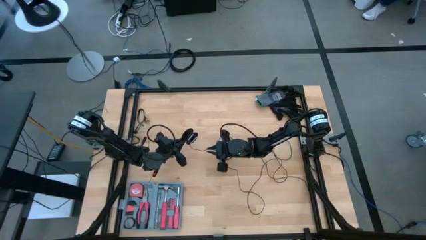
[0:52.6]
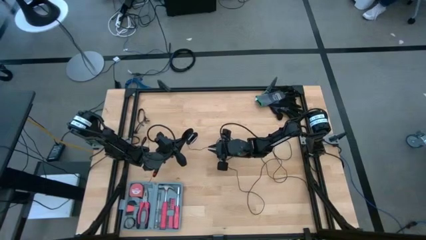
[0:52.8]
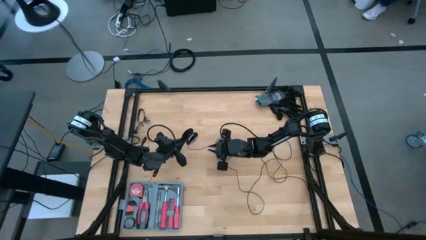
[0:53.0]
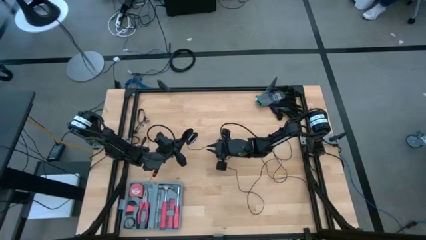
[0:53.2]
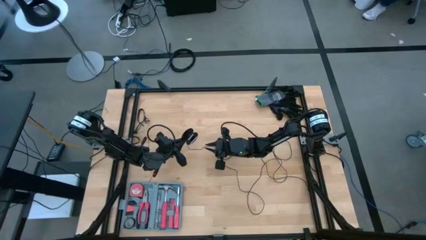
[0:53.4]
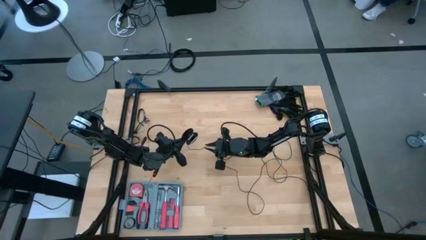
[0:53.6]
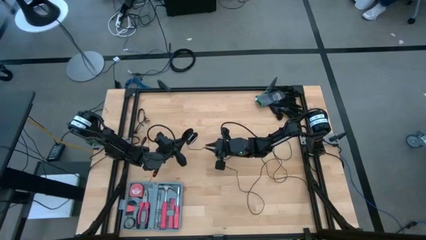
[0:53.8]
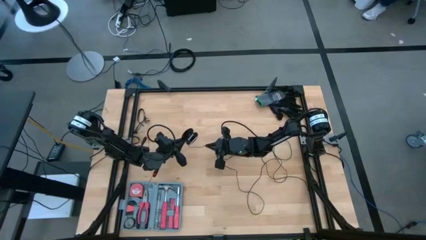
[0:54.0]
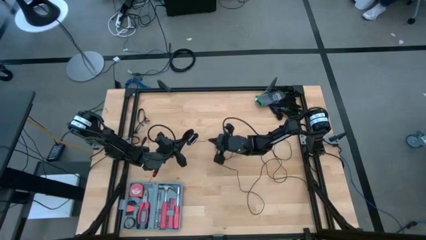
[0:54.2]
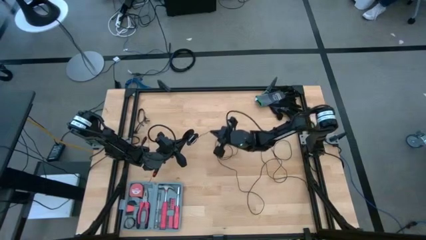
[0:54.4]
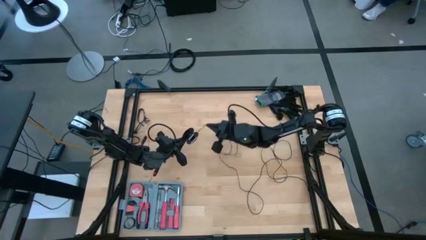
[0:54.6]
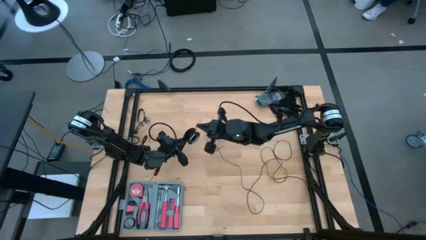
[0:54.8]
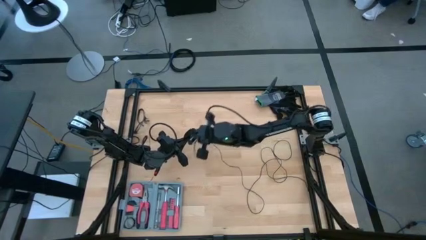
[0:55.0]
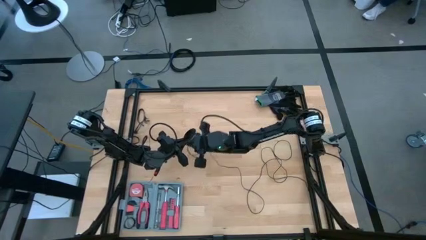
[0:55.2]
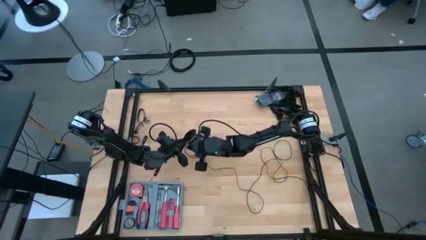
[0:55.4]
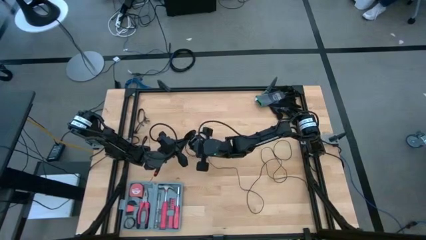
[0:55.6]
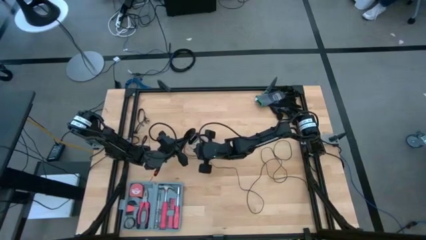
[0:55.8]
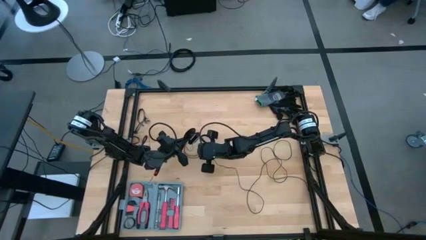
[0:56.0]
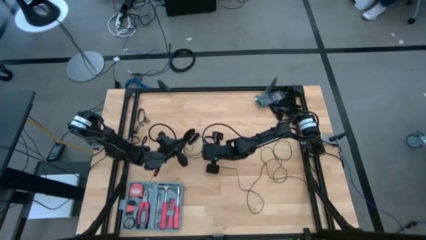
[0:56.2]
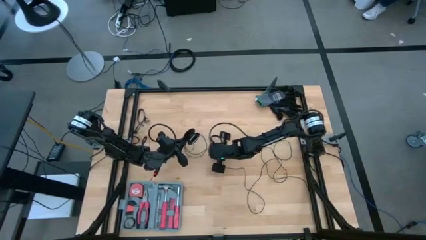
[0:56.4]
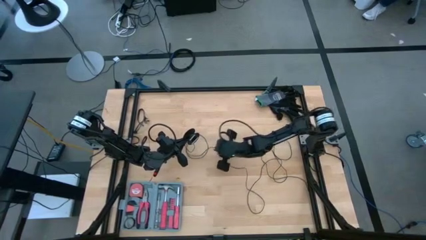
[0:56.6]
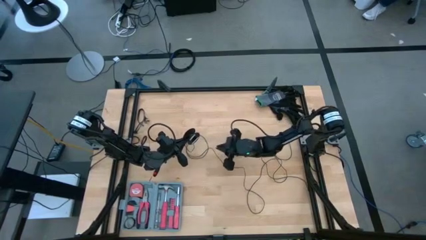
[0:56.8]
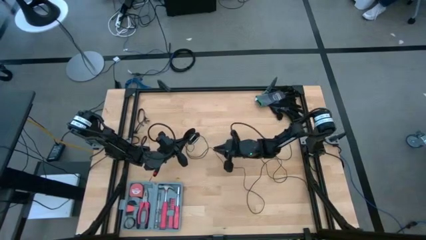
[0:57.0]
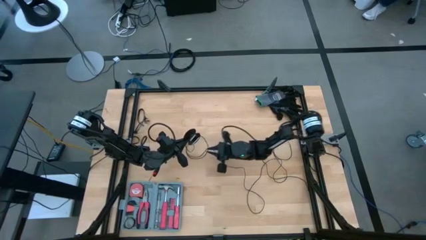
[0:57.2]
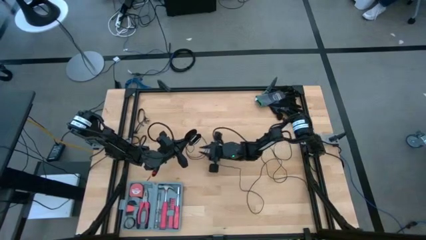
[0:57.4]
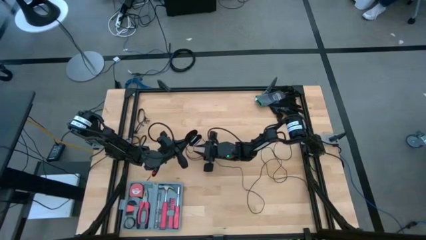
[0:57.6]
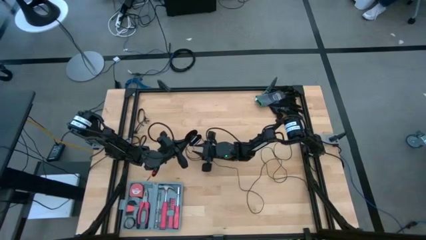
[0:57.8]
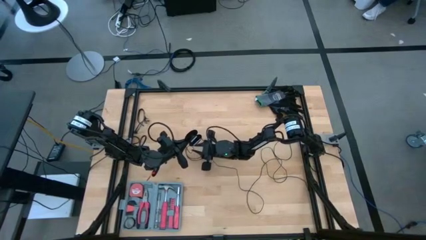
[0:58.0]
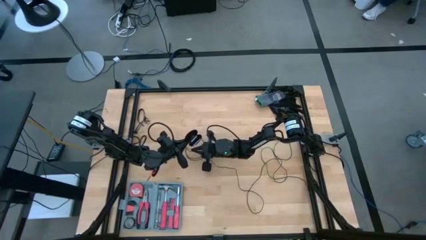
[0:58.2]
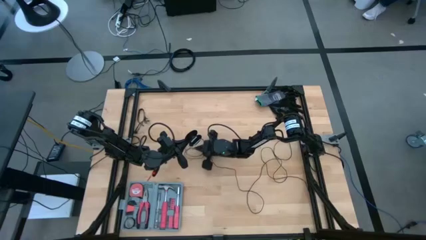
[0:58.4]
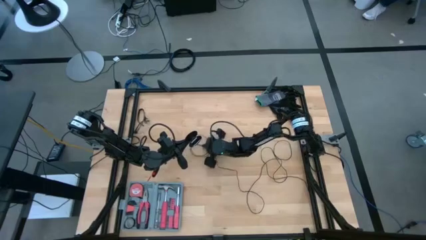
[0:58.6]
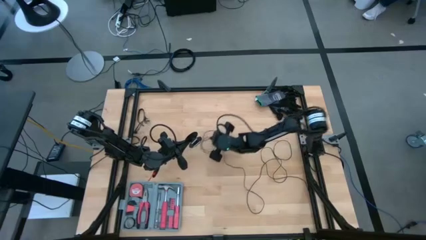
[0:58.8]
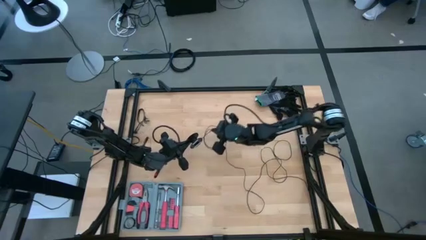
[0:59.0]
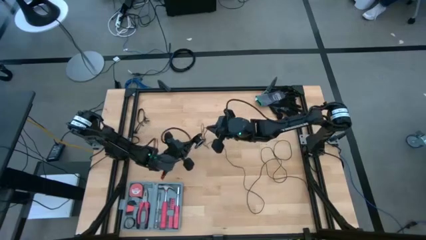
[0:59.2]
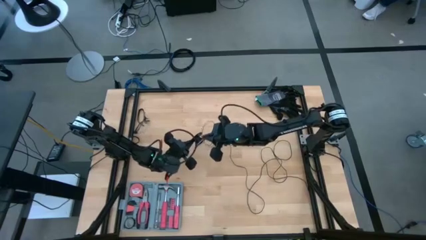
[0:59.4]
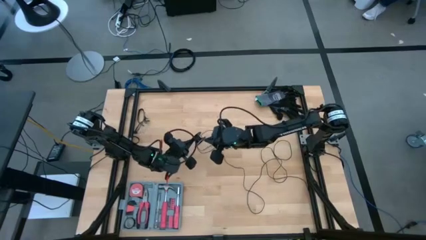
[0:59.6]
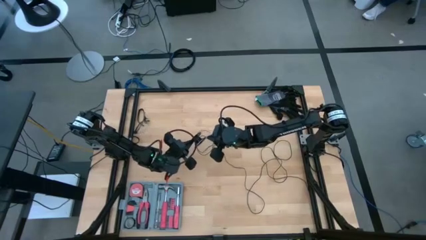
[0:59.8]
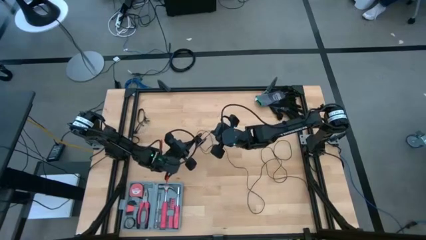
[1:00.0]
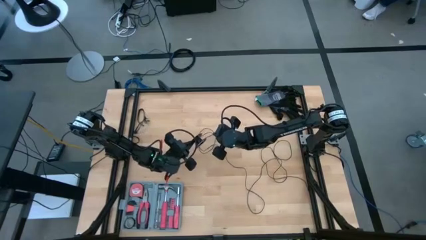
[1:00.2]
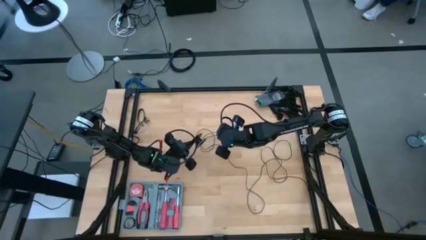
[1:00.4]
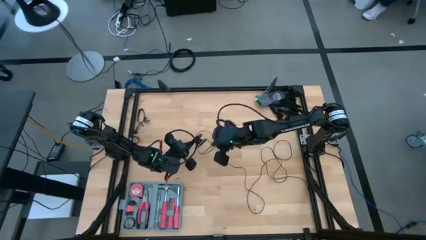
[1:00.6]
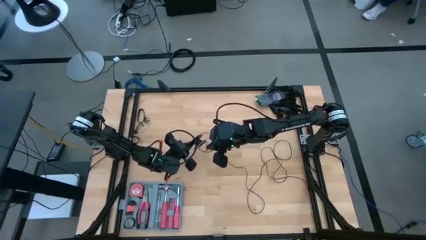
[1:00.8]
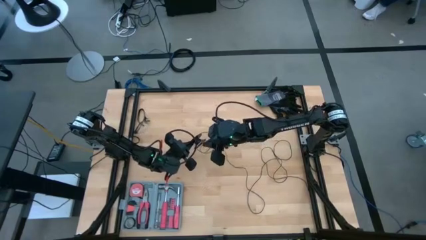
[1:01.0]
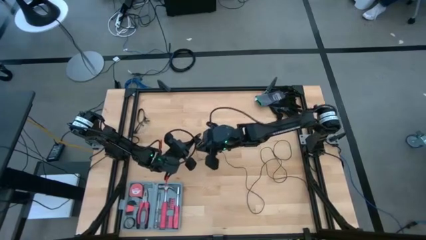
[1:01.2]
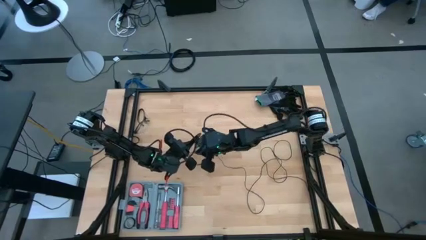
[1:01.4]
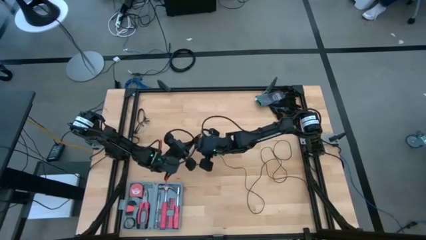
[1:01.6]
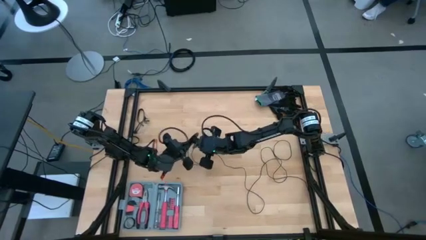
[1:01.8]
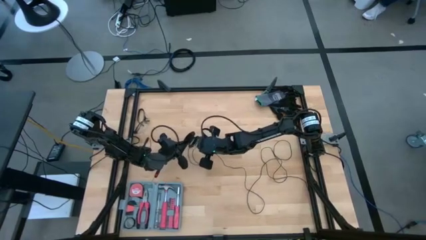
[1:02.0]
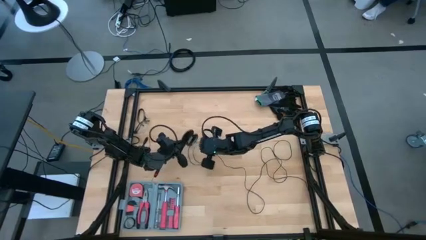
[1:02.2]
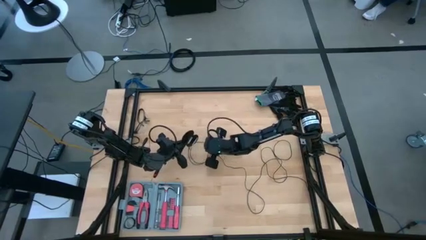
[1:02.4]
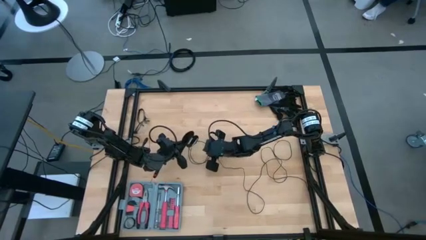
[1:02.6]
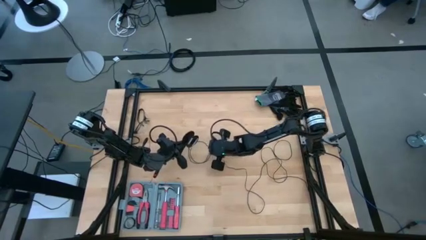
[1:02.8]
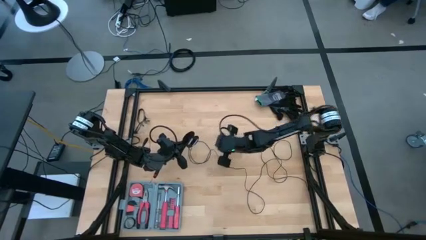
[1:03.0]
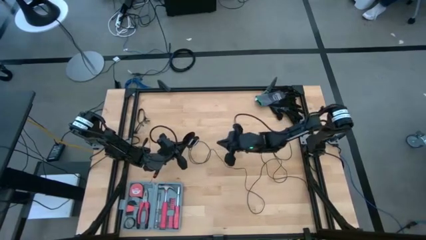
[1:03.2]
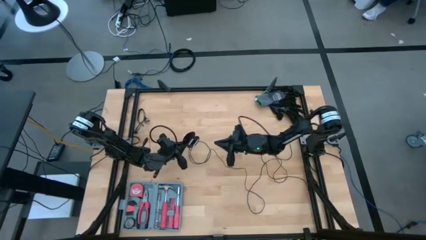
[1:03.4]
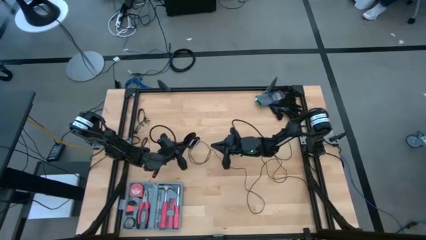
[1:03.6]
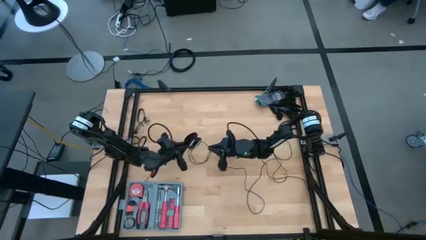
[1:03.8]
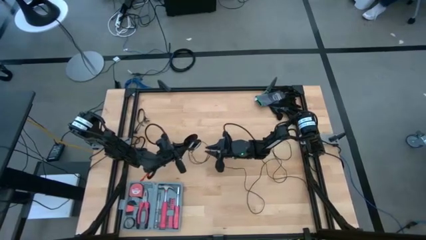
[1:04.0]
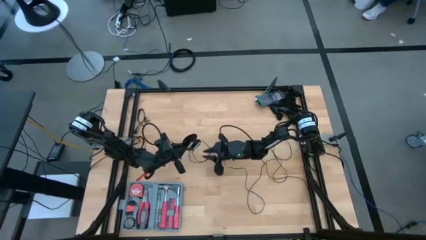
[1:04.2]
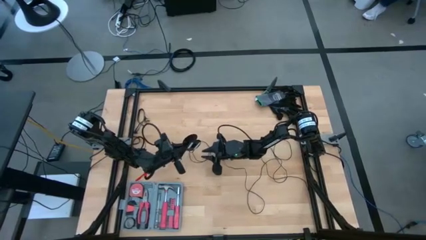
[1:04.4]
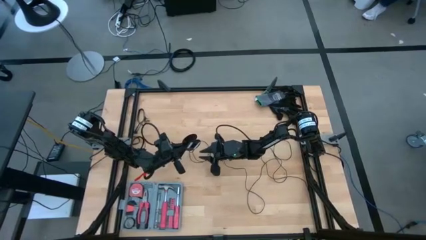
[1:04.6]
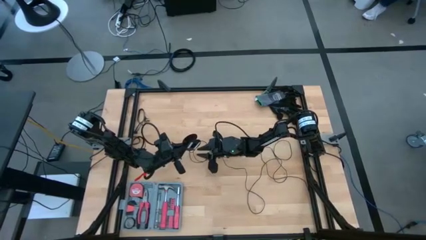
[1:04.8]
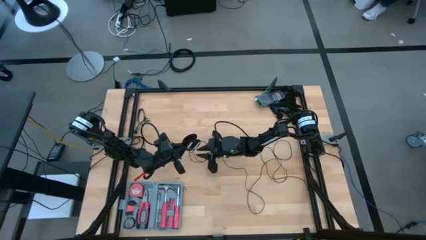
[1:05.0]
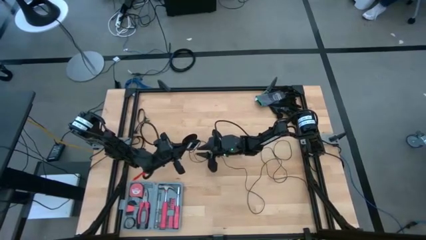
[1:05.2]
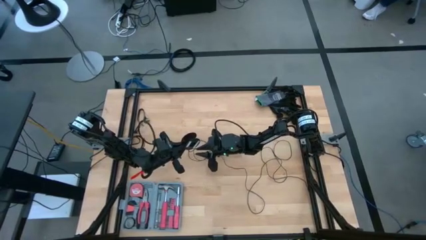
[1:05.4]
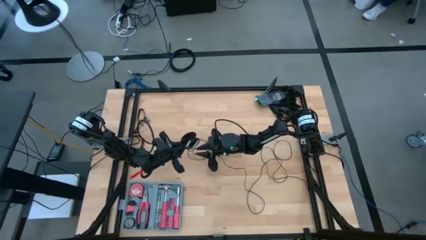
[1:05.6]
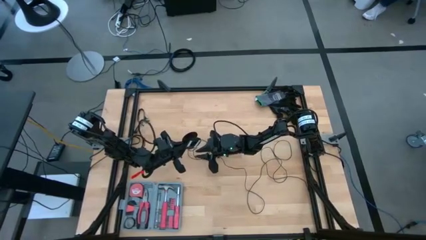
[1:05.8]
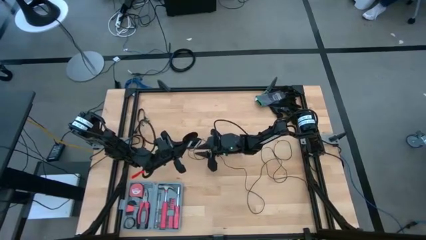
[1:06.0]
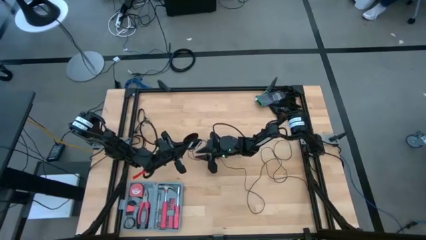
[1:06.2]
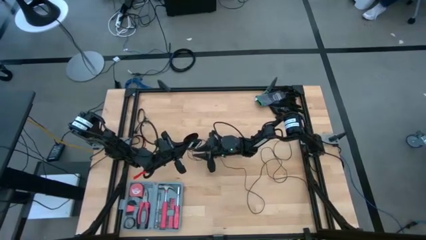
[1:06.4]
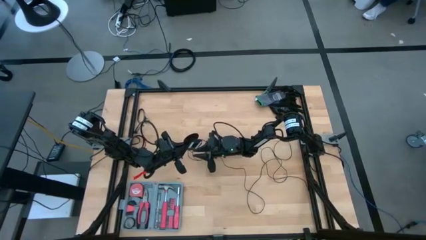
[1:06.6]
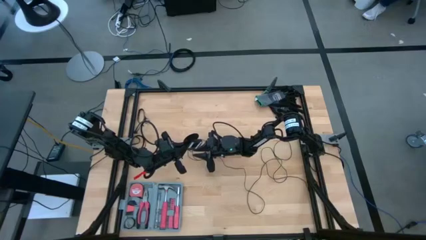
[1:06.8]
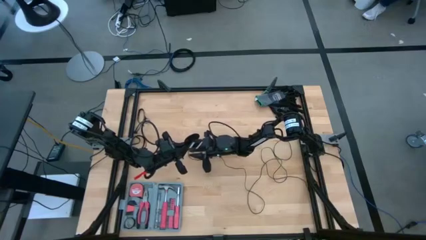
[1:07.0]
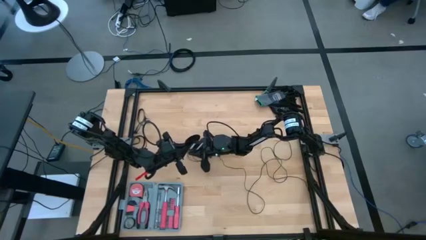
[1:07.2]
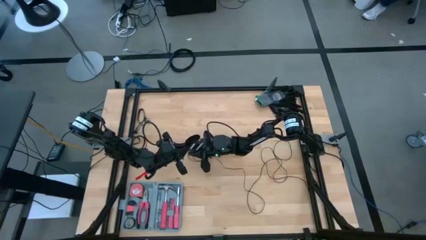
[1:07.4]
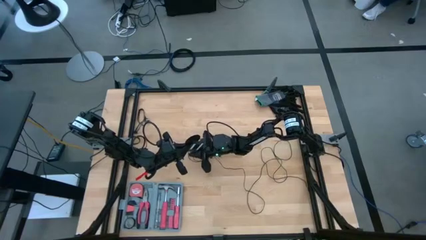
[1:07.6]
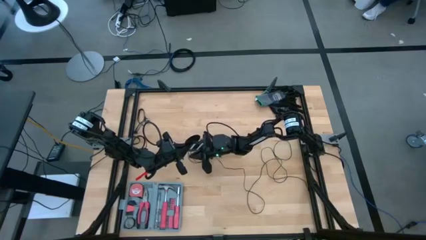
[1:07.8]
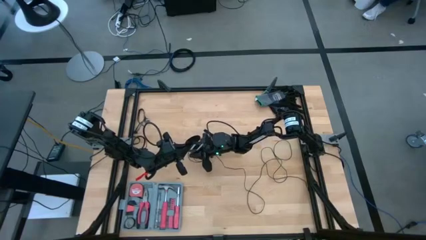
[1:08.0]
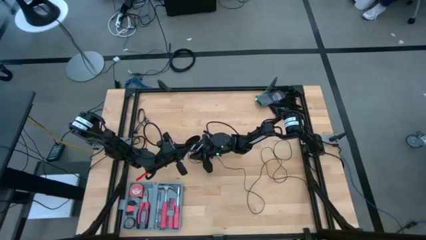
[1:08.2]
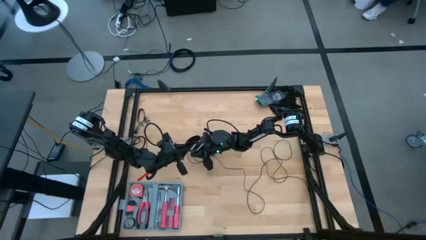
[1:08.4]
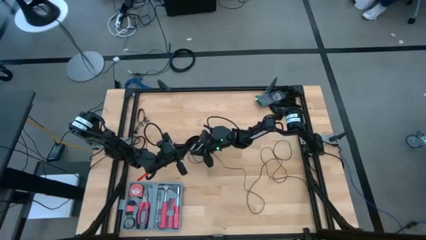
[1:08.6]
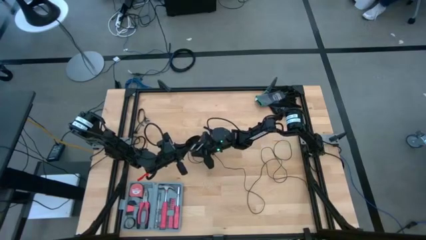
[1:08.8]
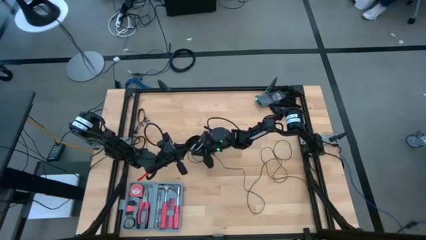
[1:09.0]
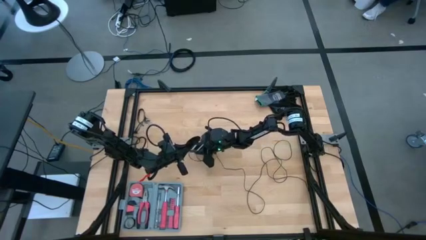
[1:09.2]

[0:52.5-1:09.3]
Task: Coil cords
Coil the black wire onto the spool
